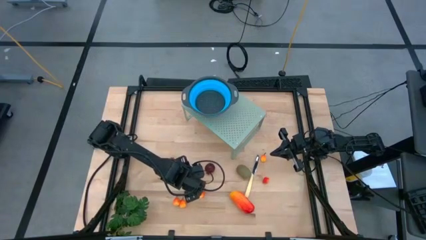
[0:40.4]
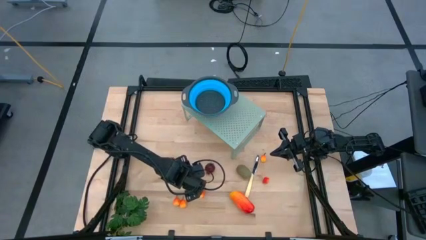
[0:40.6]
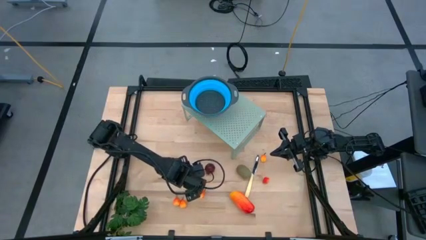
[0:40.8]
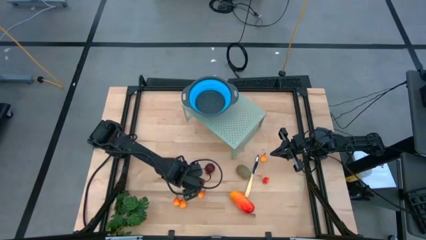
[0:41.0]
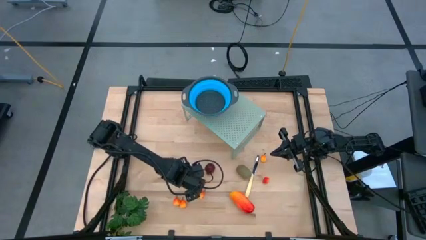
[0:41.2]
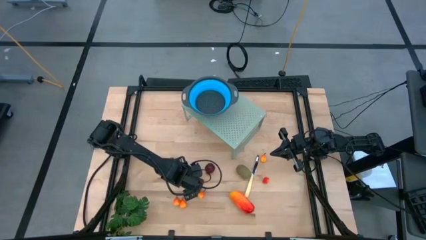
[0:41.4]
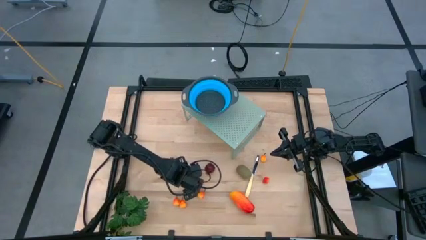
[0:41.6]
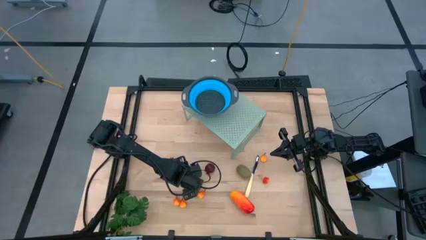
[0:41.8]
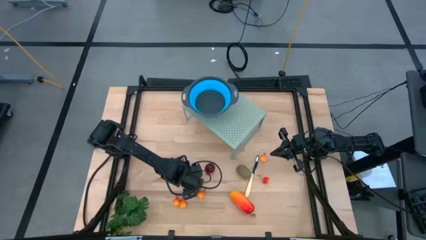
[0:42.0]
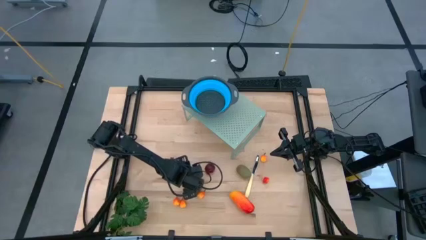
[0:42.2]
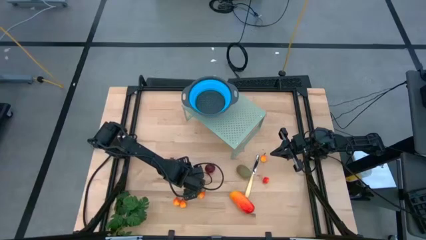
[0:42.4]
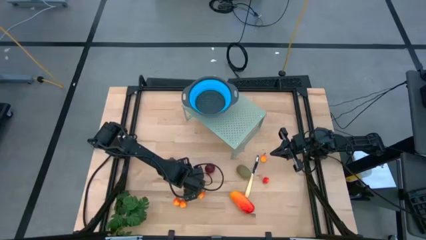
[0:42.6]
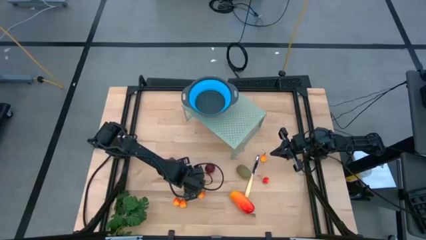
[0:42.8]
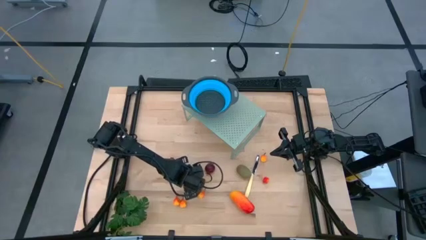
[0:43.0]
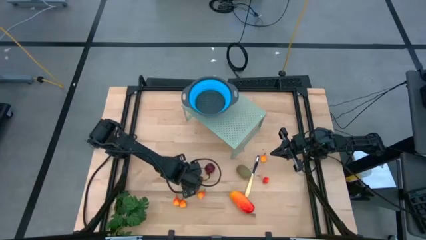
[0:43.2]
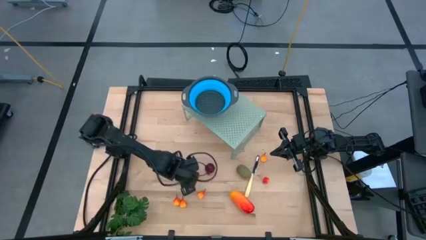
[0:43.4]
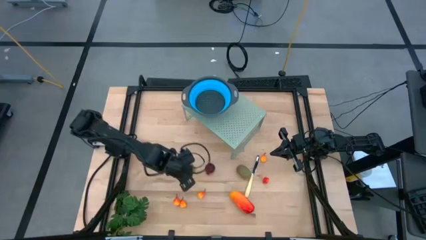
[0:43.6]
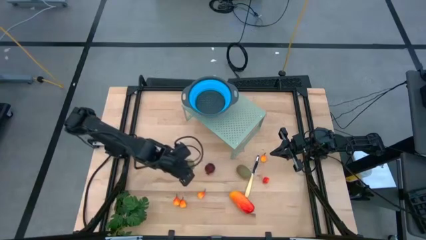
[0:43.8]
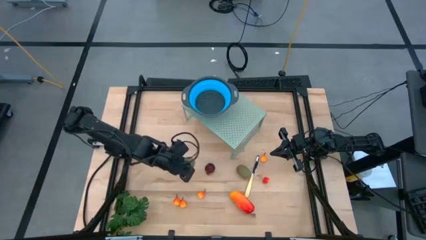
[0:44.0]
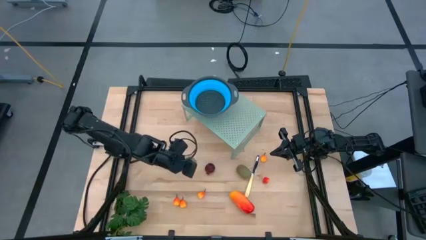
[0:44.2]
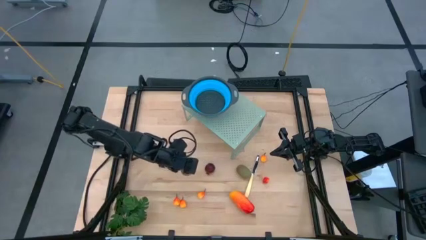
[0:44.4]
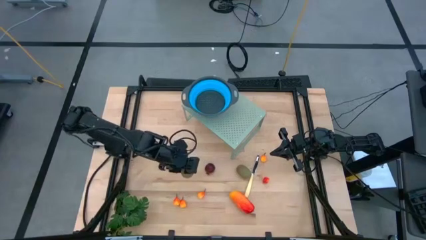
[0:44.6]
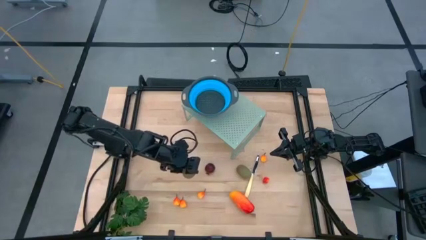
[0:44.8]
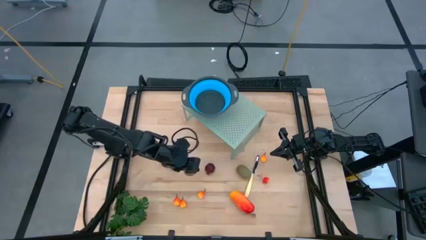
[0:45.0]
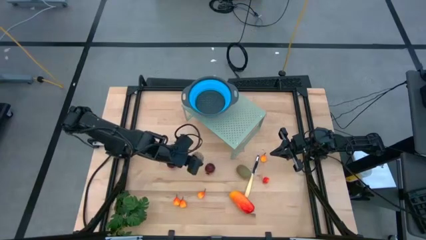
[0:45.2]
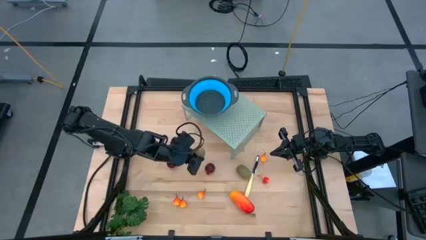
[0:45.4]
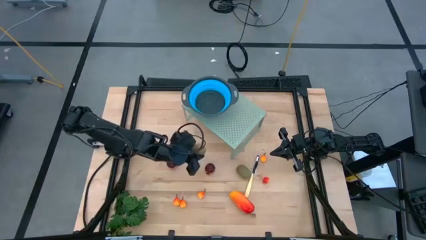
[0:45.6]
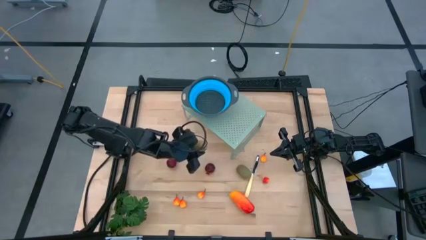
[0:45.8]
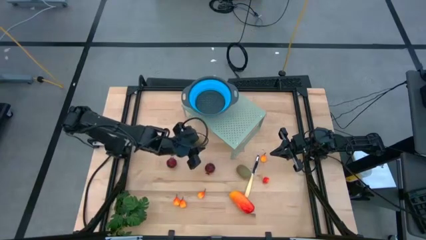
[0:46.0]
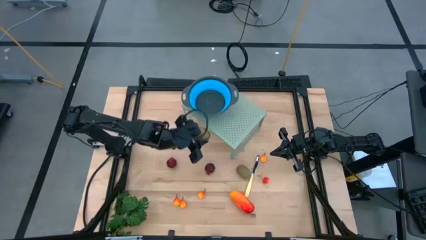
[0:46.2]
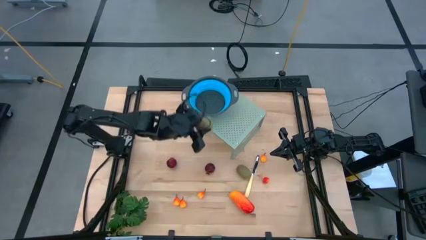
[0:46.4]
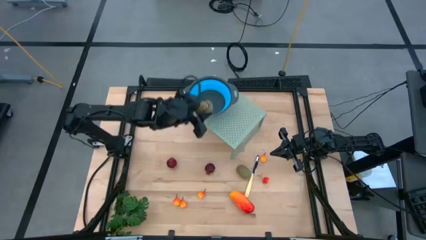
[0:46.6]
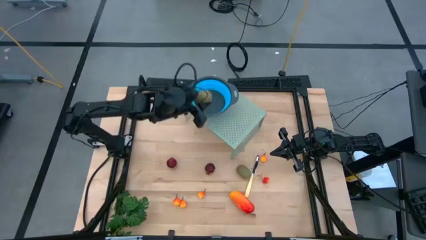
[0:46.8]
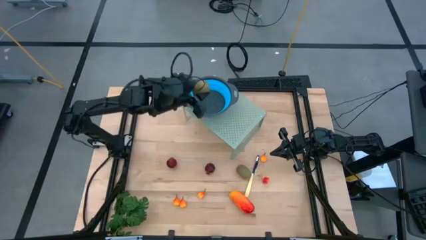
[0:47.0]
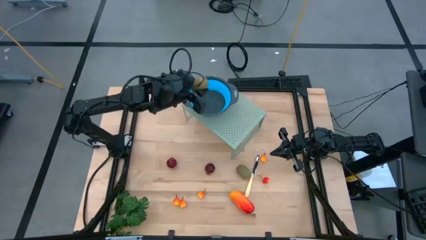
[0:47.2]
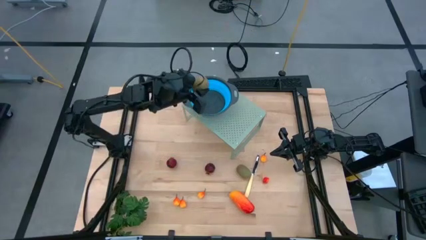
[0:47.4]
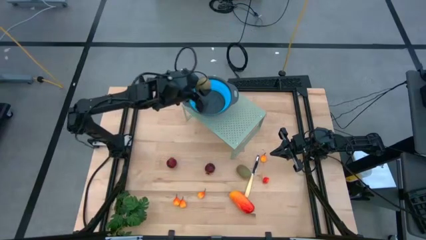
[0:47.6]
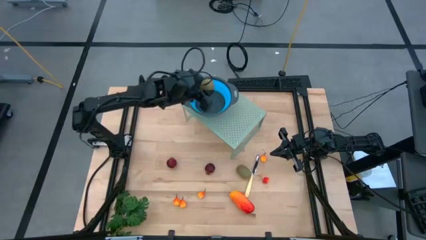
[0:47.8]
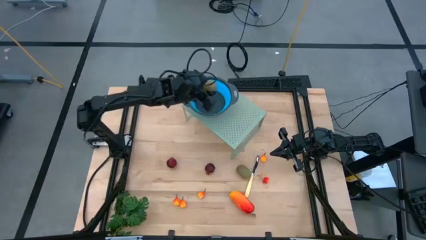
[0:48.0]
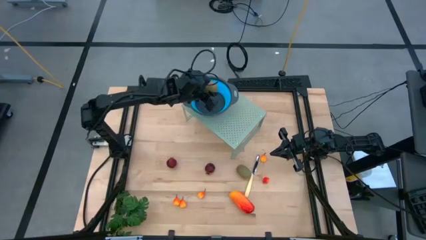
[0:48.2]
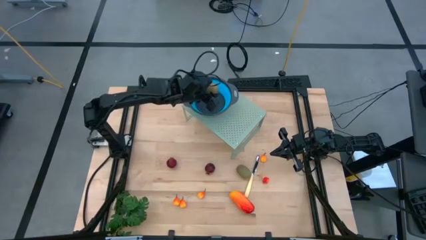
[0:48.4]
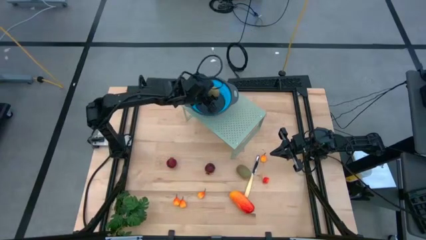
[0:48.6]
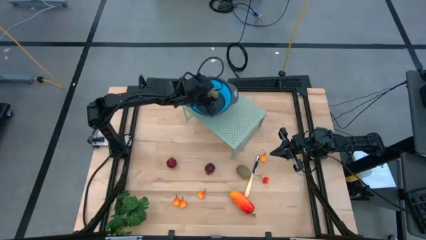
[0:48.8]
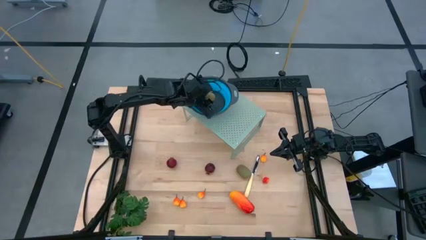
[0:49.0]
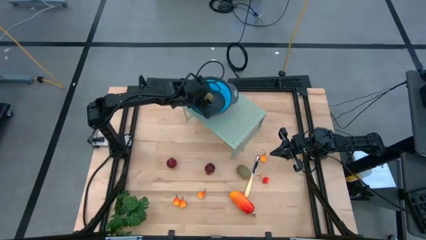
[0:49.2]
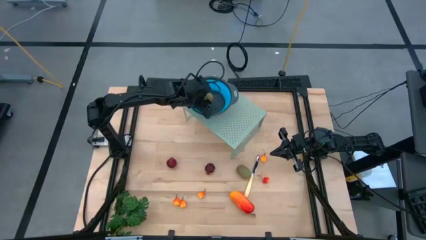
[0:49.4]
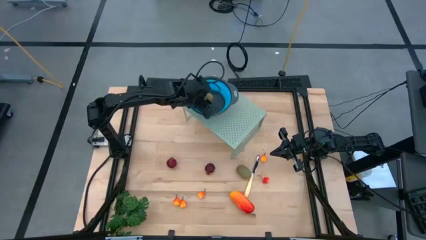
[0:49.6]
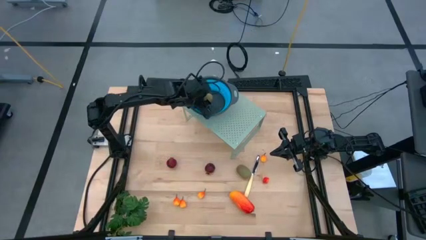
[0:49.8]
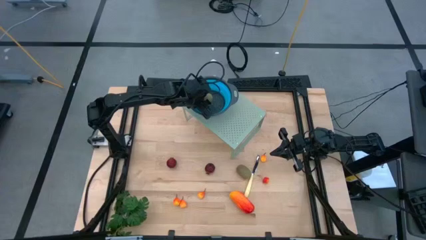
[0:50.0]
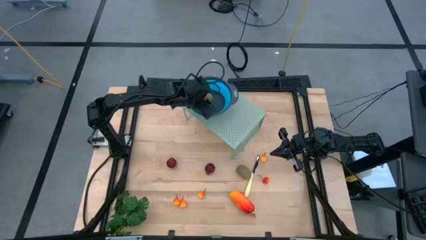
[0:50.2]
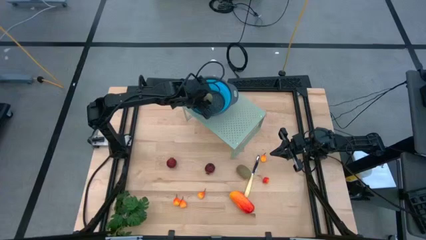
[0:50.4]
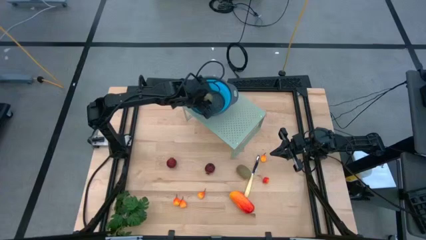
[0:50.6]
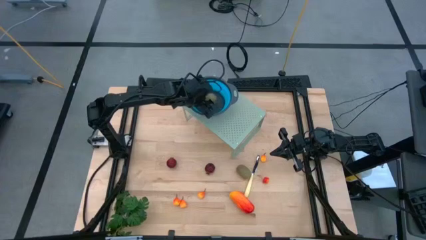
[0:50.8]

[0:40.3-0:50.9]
Task: Pick & Place Fruit
Put the kiwi into the blue strainer bowl on the shelf

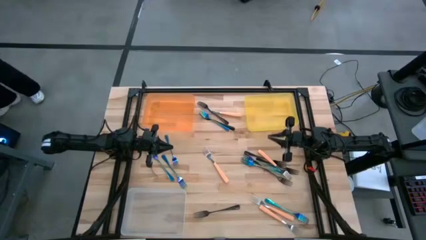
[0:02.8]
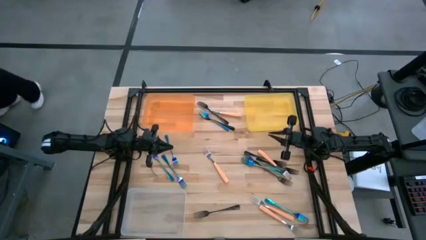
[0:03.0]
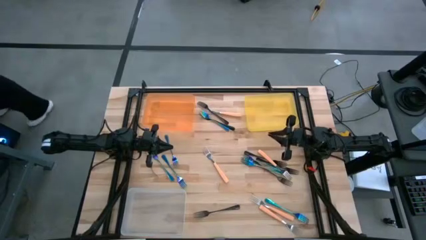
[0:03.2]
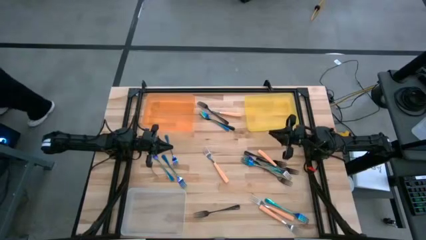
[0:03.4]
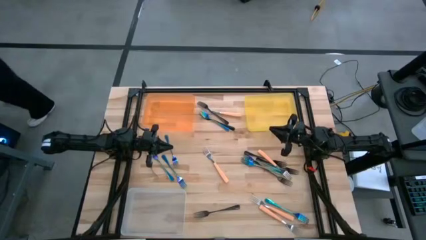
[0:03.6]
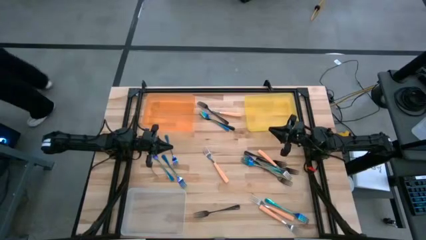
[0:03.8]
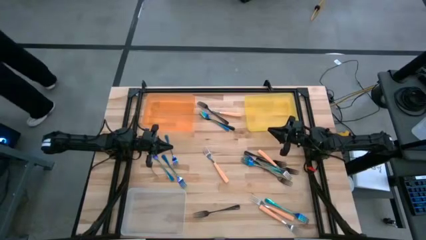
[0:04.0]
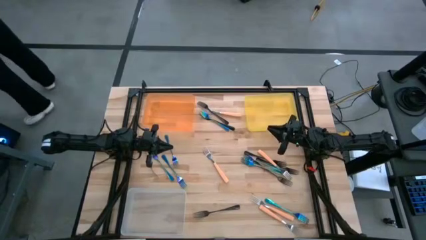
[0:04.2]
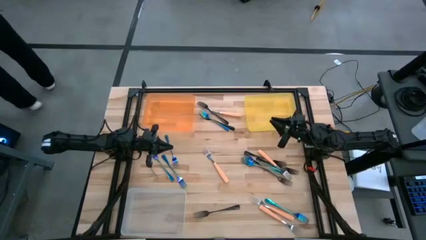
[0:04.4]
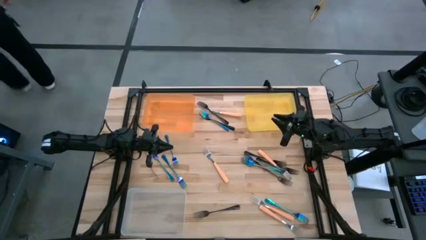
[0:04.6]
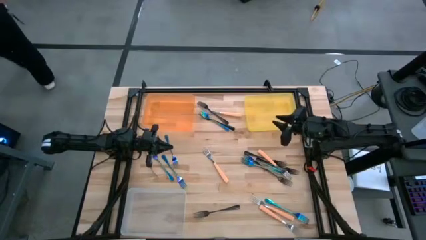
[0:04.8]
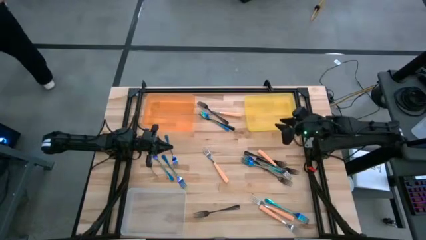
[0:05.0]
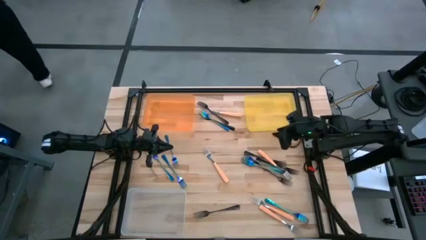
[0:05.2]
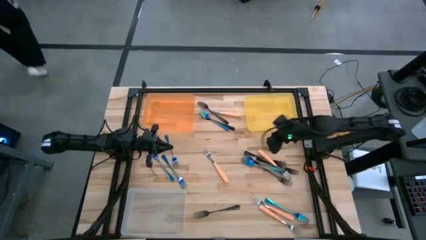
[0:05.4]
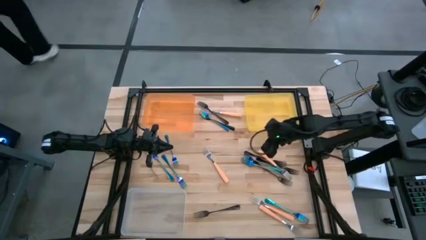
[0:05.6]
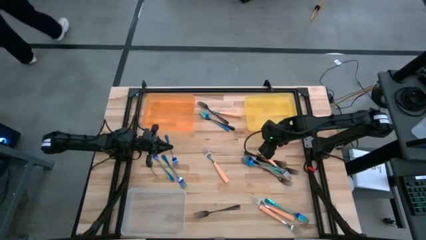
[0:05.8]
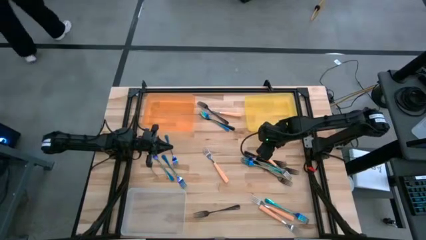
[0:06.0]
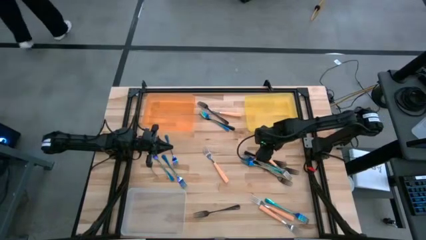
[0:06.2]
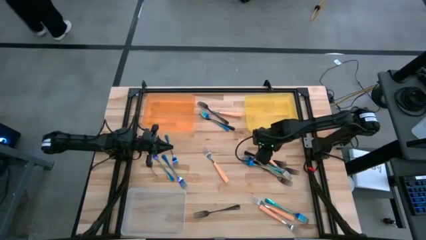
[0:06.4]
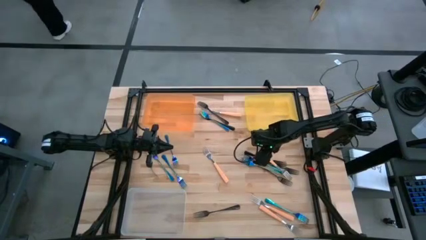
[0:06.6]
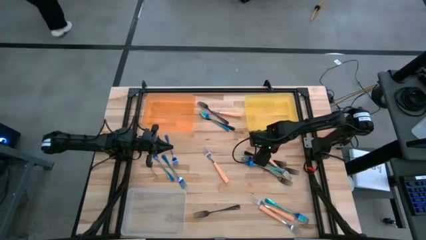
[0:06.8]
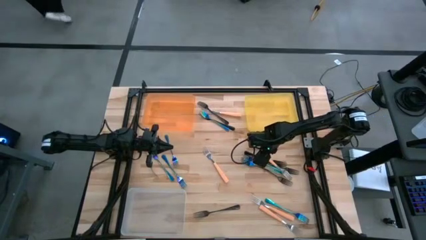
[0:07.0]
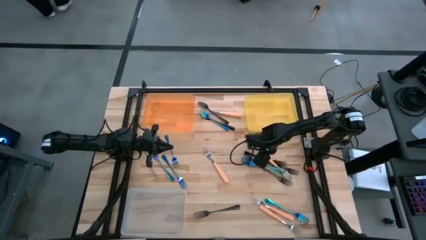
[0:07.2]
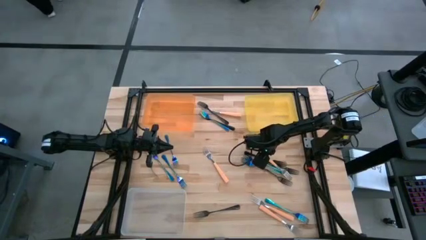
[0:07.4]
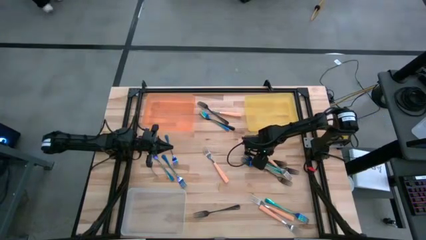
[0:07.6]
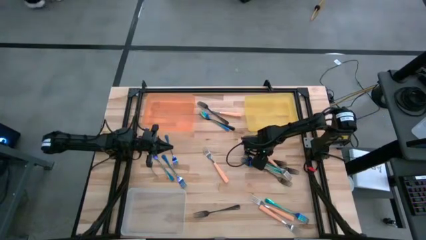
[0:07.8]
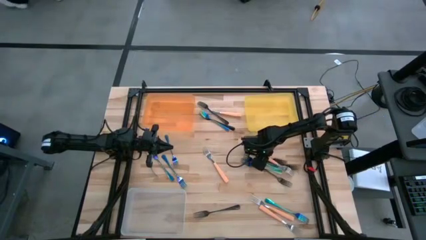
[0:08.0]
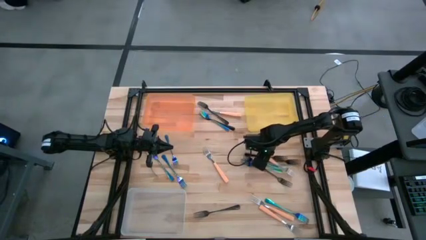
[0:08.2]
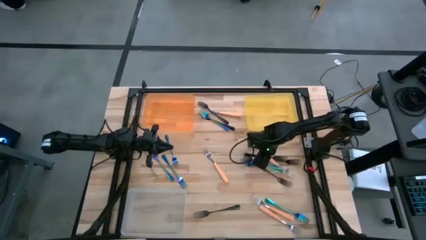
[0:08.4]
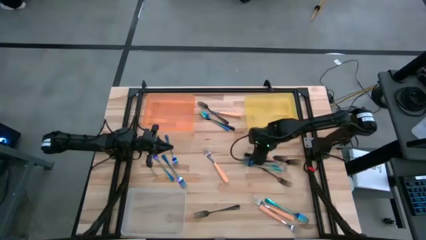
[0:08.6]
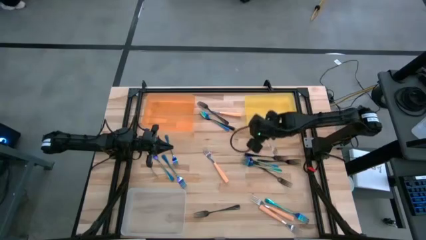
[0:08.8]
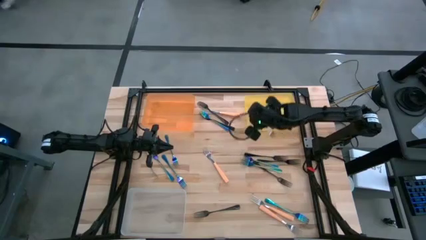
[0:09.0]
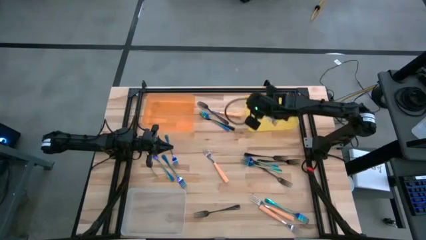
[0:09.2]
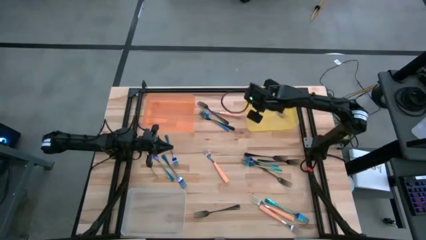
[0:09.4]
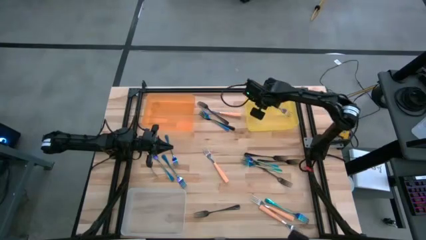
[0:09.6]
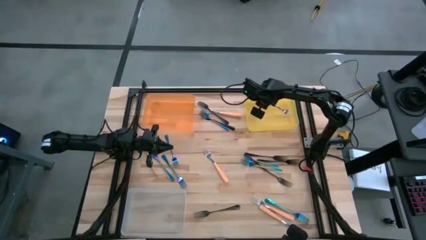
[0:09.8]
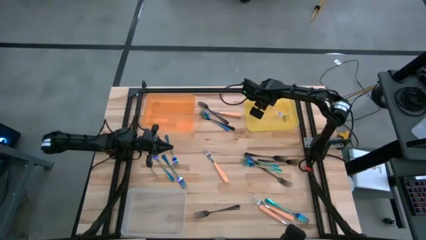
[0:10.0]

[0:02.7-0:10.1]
Task: Sort silverware by color (type)
Put the orange fork into the yellow bin
